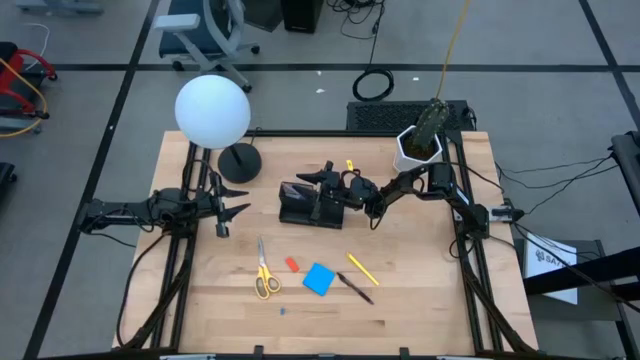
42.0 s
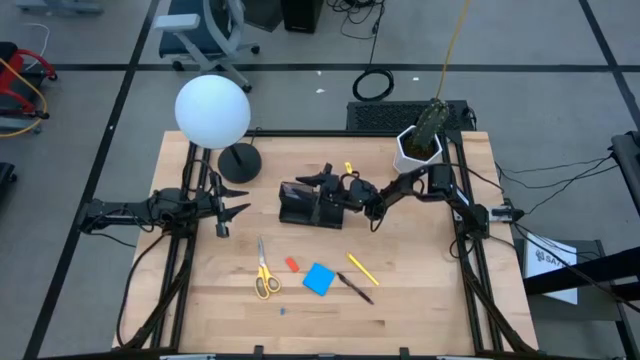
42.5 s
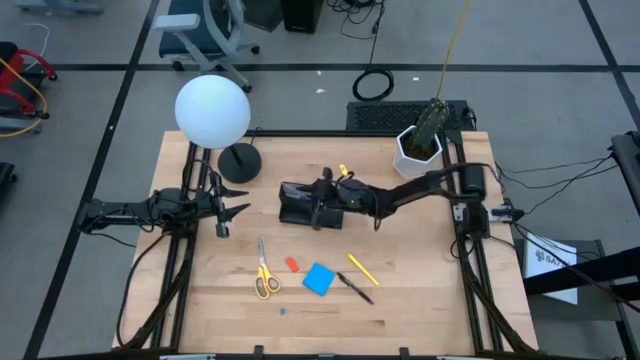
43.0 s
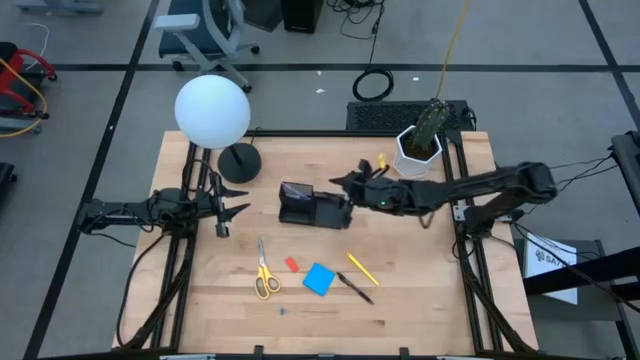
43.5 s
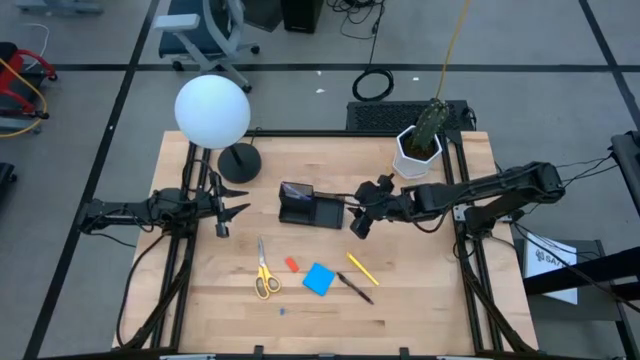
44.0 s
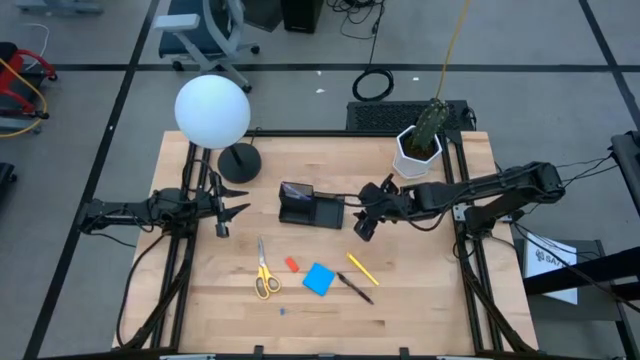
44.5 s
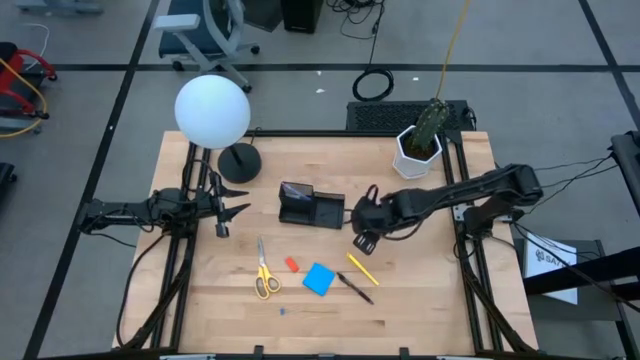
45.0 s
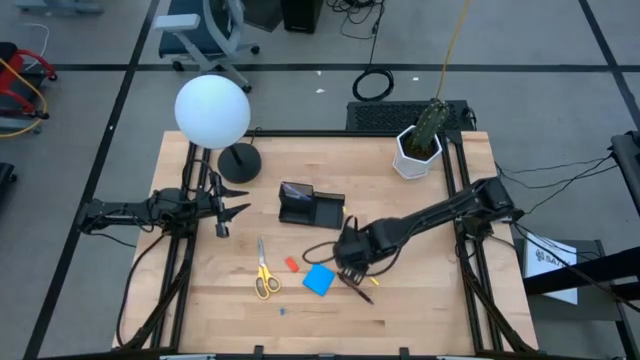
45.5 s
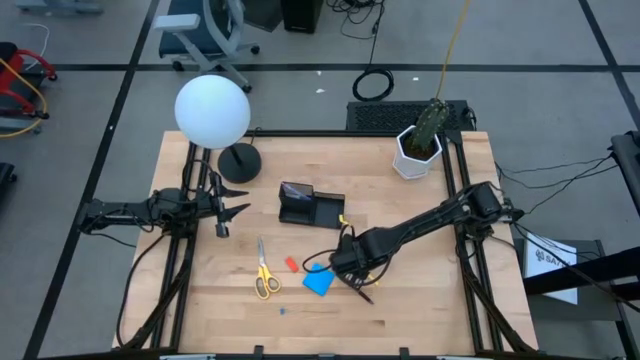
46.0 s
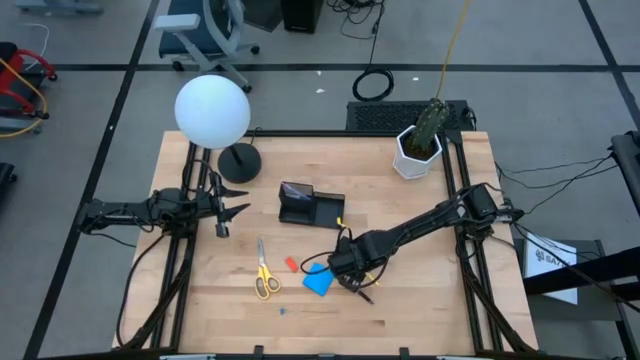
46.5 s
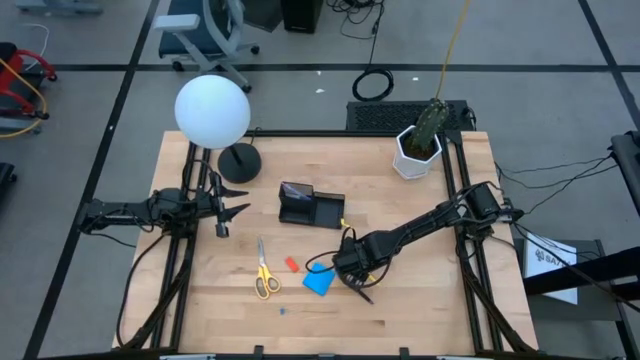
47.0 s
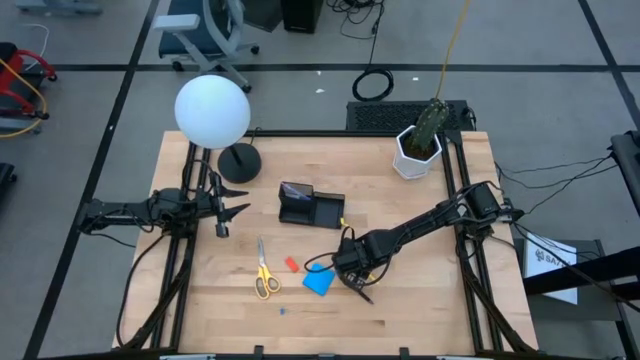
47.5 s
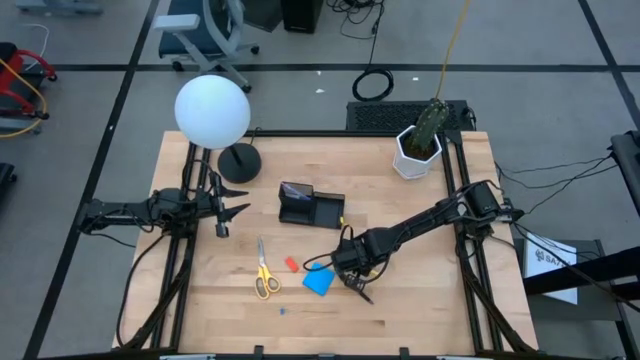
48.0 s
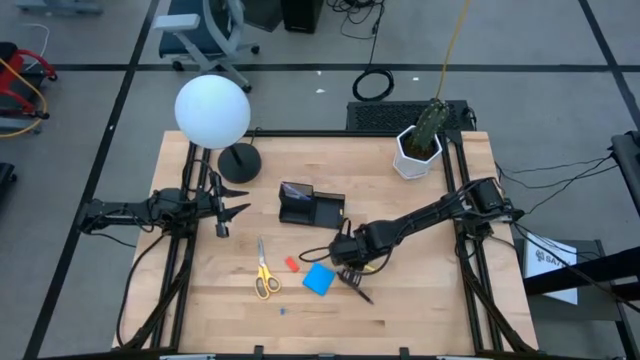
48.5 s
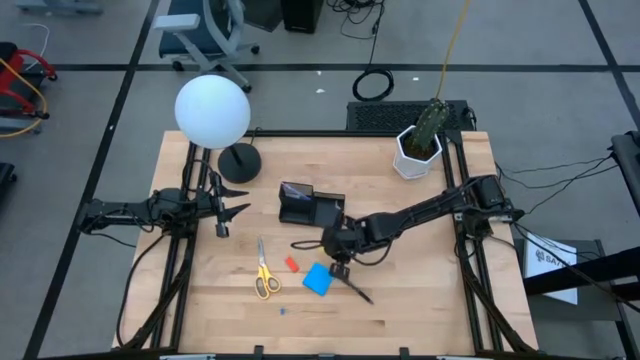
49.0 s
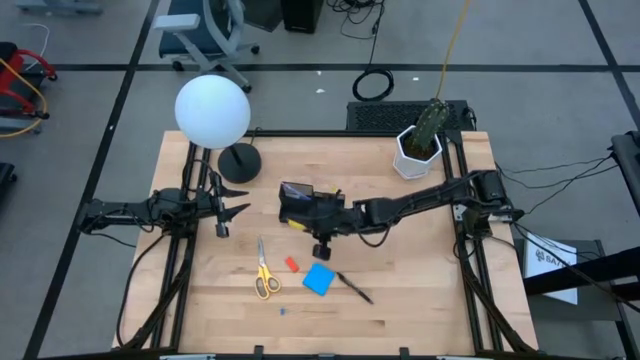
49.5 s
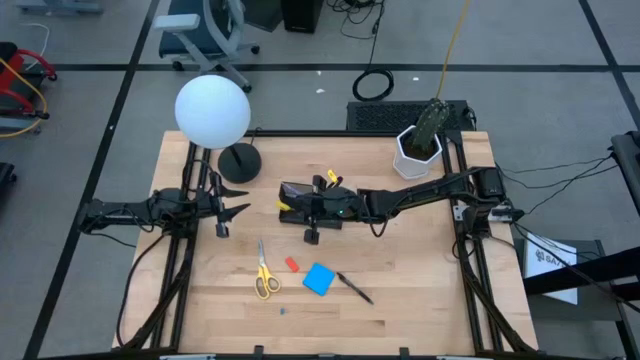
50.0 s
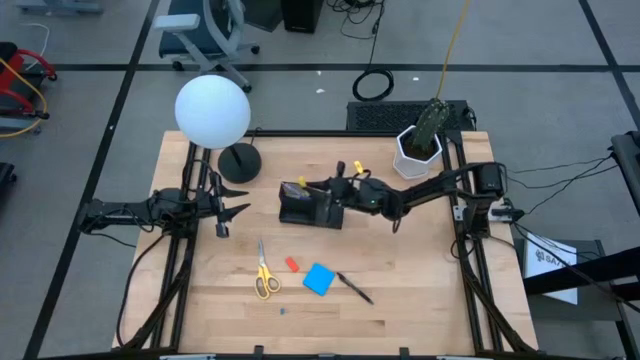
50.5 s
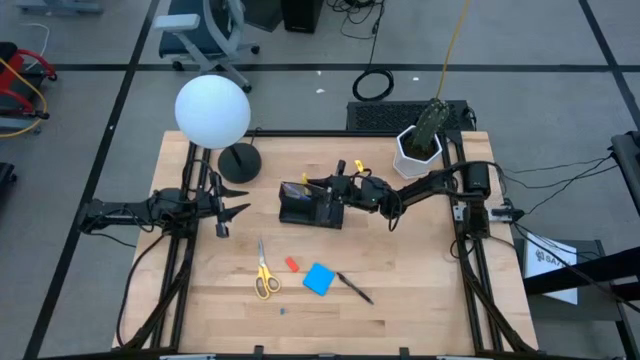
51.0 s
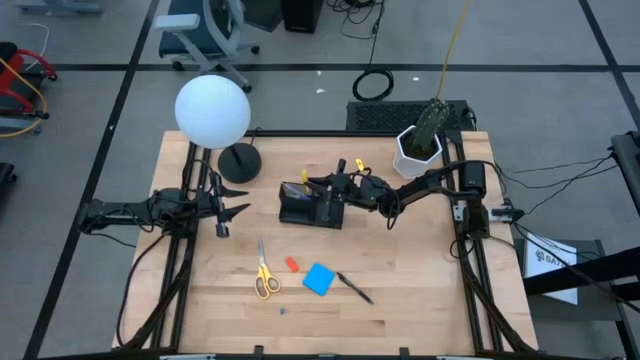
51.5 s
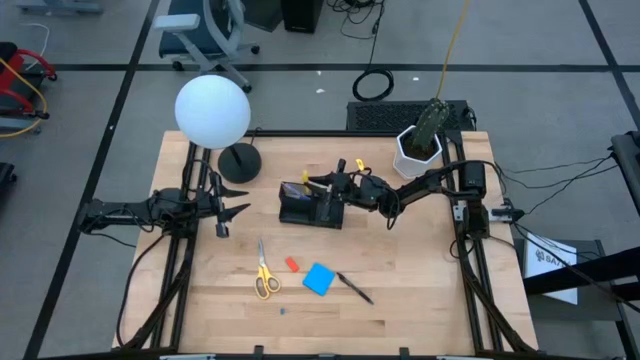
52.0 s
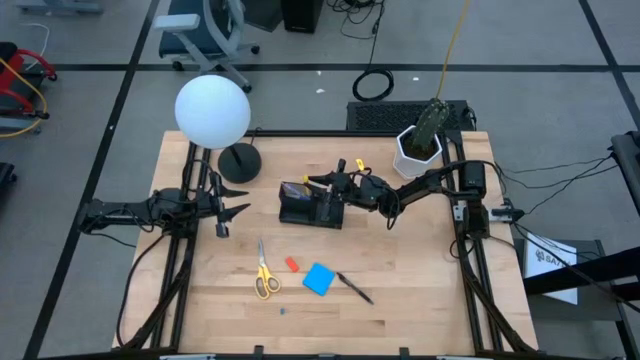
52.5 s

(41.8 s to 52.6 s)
Task: Pick and place office supplies into organizer
Put the yellow pen into the desk organizer

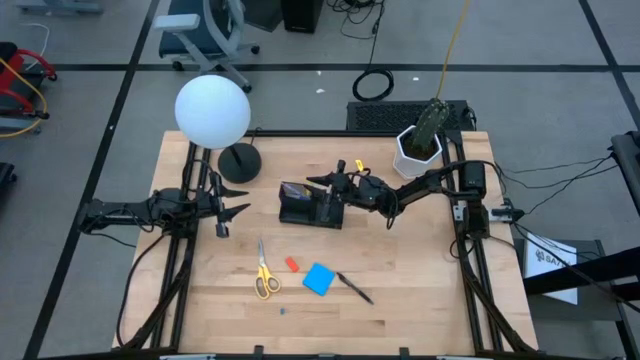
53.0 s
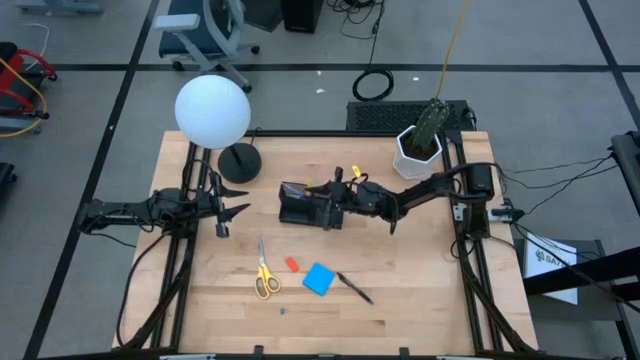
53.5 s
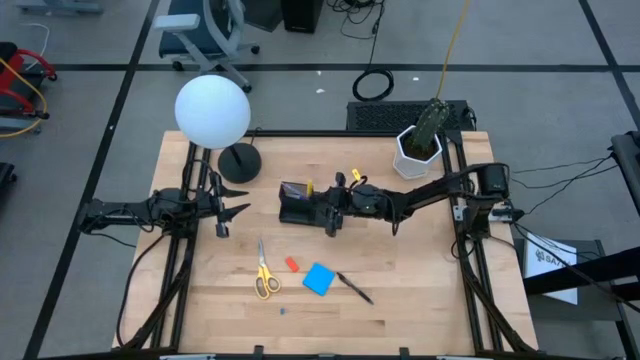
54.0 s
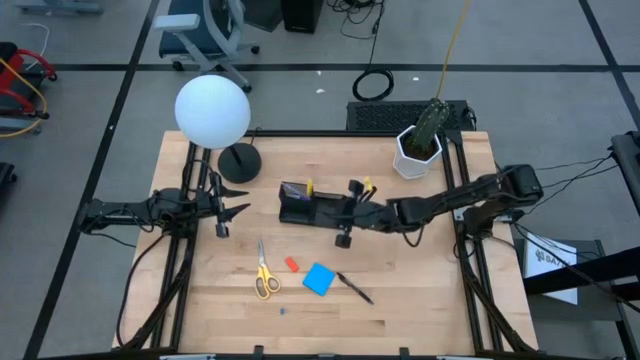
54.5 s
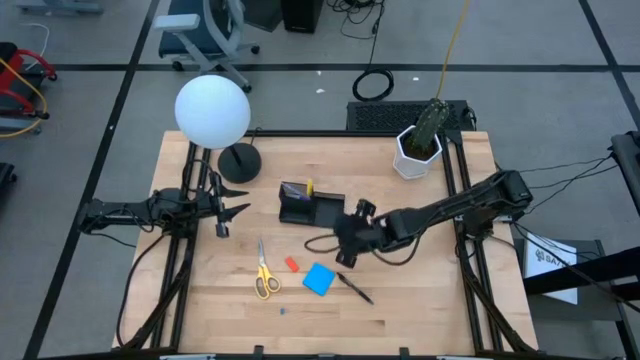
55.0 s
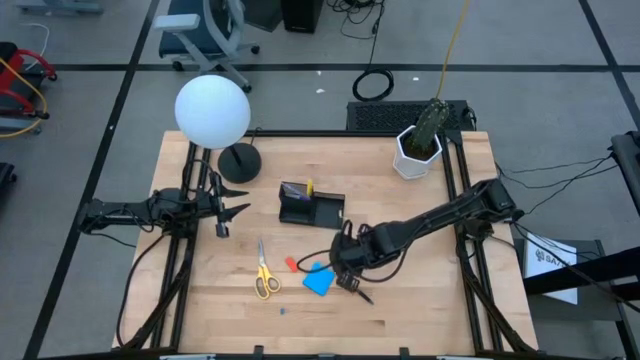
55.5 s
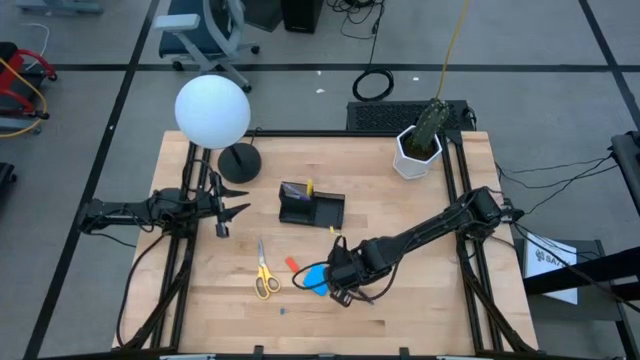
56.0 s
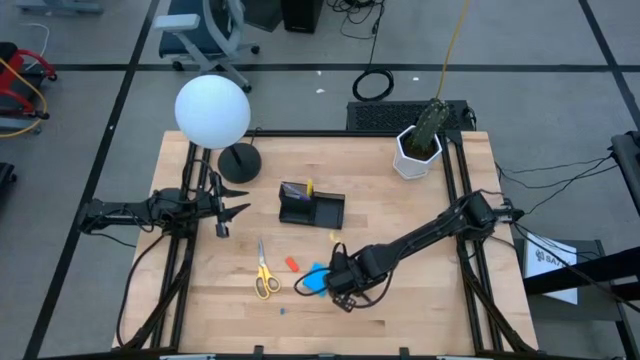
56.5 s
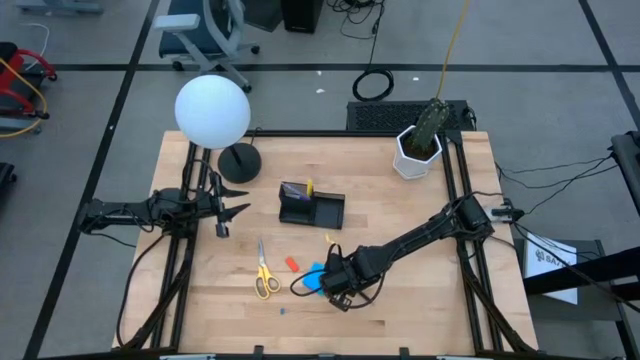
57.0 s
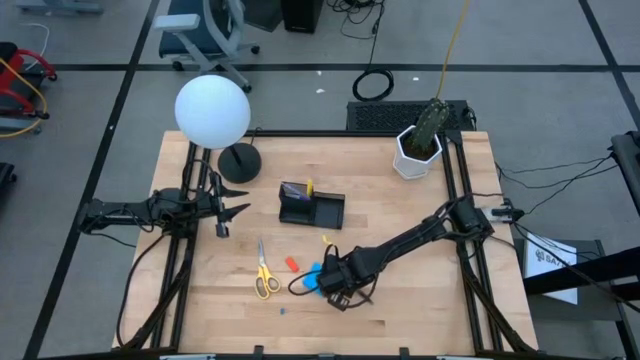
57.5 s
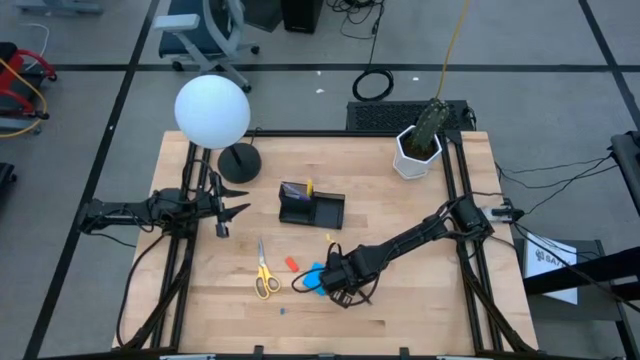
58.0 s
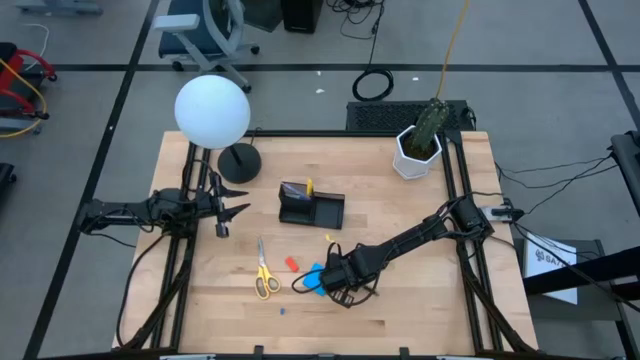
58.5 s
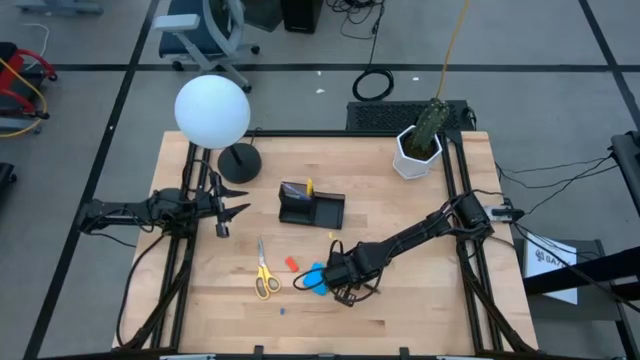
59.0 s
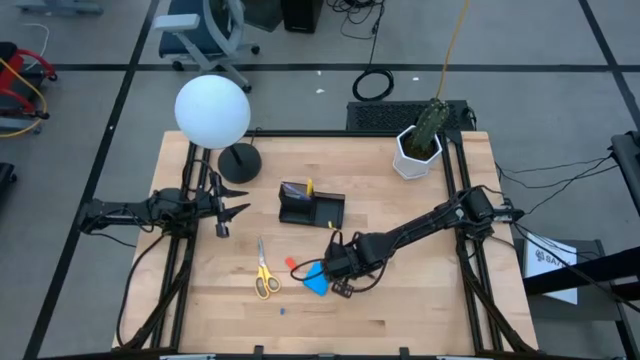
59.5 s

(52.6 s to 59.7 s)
Put the black pen into the desk organizer

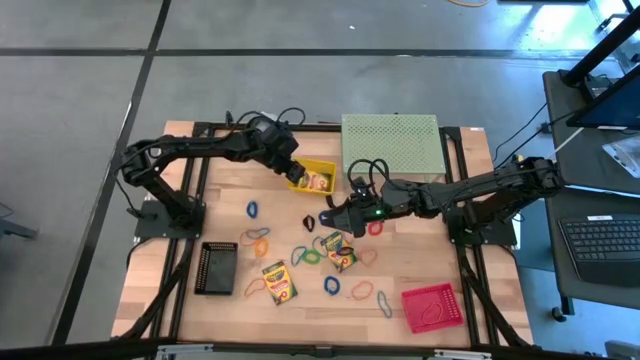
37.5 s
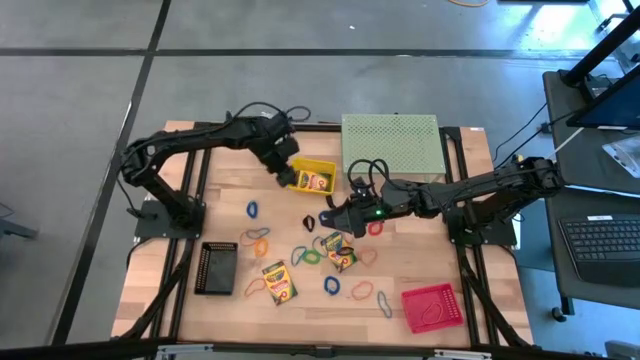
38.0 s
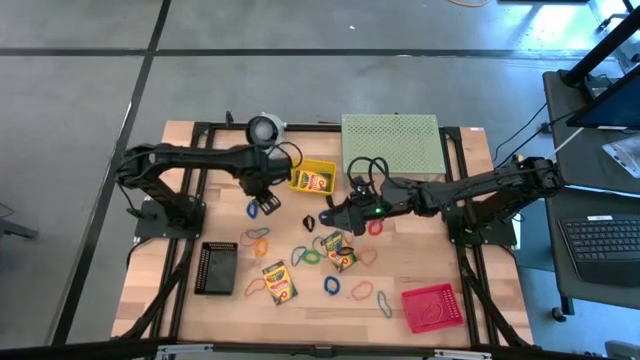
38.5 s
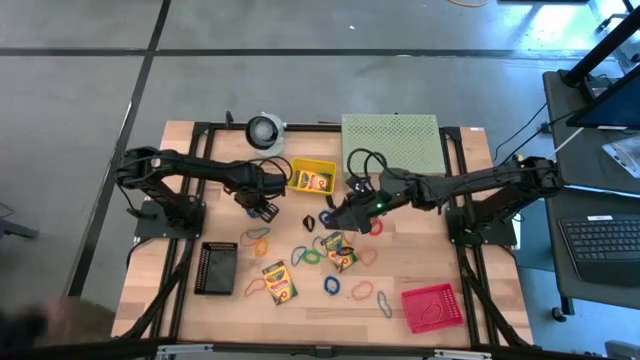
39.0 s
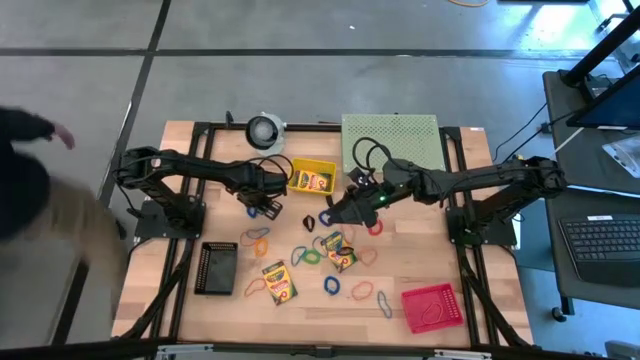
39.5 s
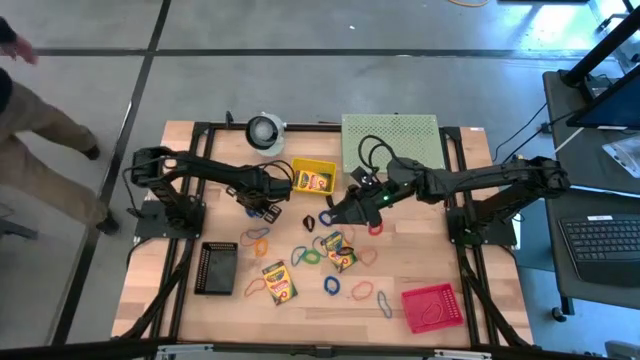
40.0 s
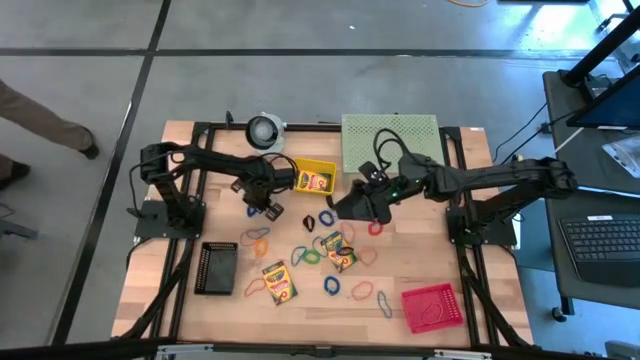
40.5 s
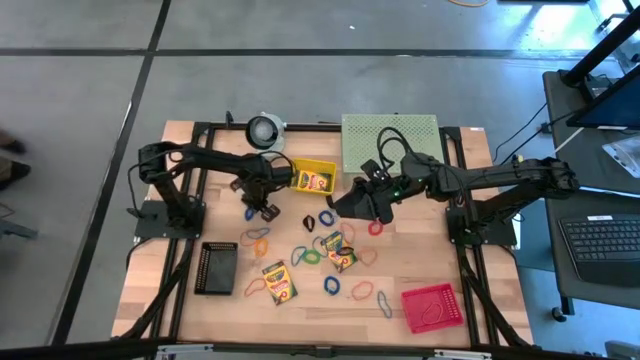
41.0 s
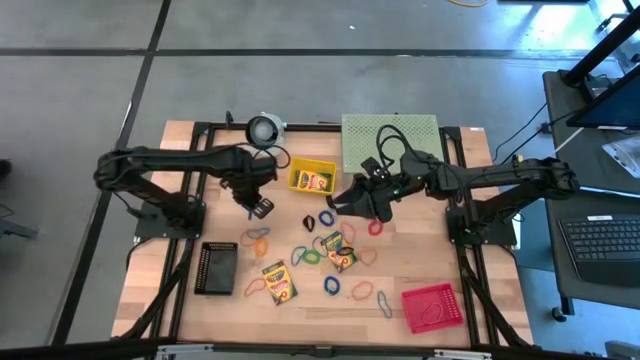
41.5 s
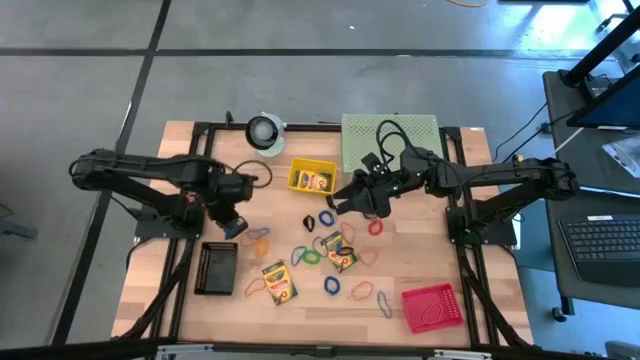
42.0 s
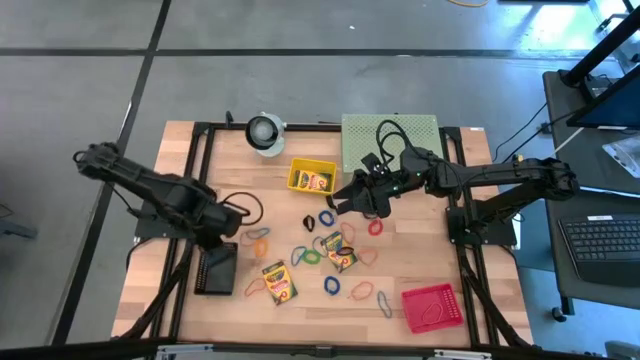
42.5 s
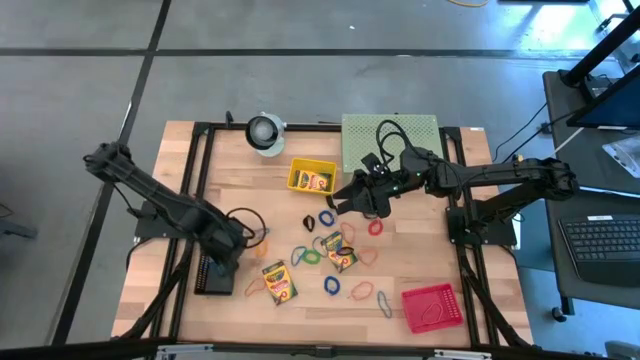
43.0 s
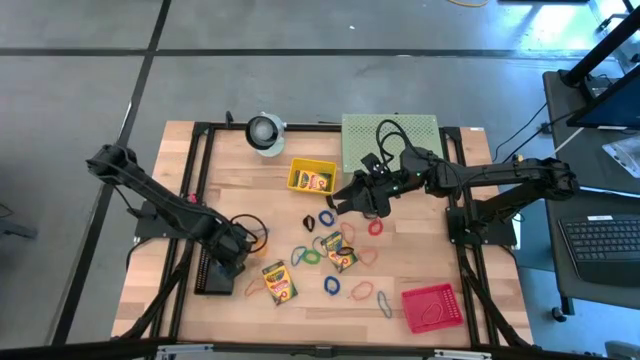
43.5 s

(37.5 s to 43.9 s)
Task: Pick & Place Office Desk Supplies
Put the blue spring keychain into the black bin
